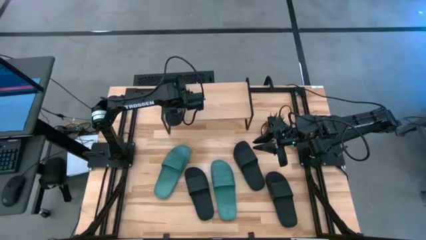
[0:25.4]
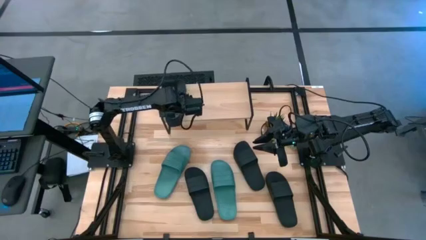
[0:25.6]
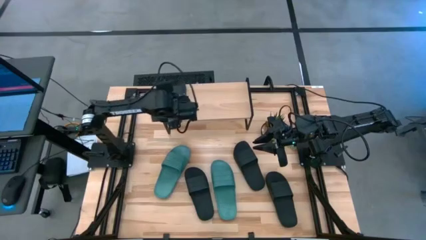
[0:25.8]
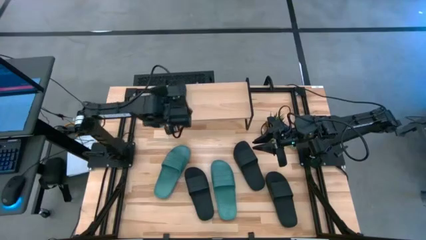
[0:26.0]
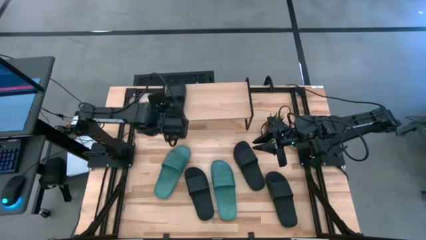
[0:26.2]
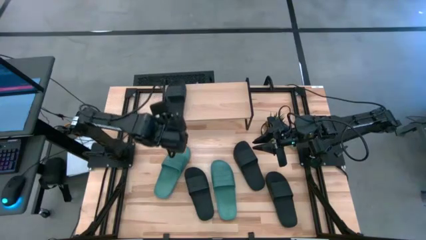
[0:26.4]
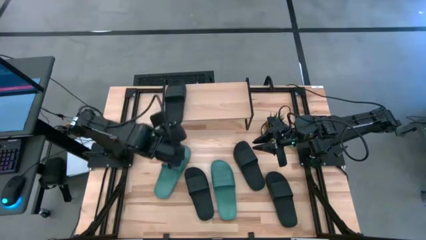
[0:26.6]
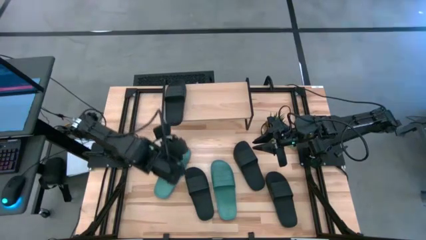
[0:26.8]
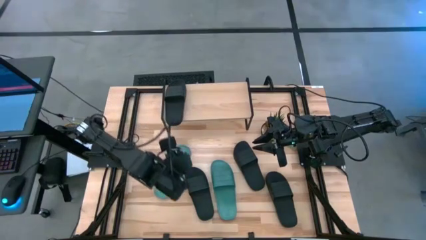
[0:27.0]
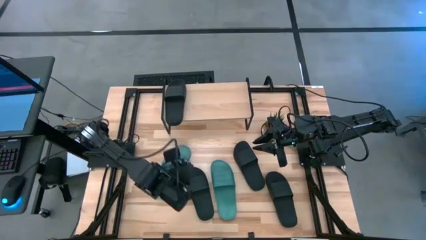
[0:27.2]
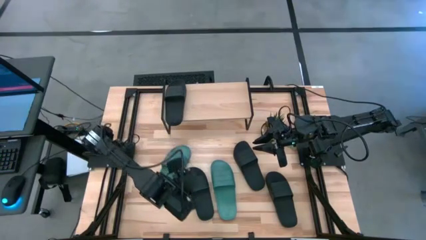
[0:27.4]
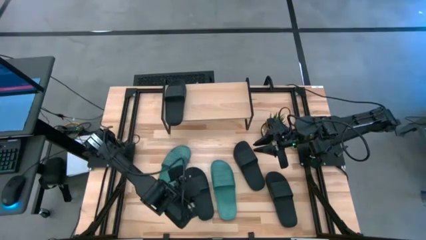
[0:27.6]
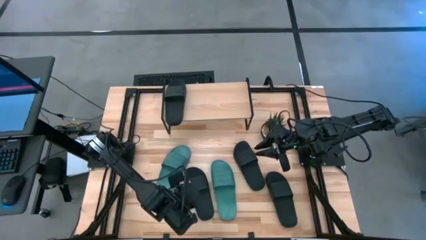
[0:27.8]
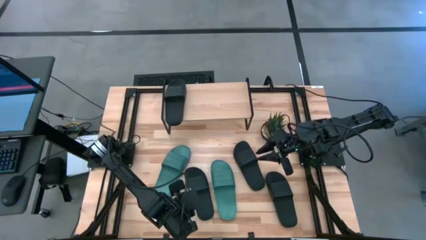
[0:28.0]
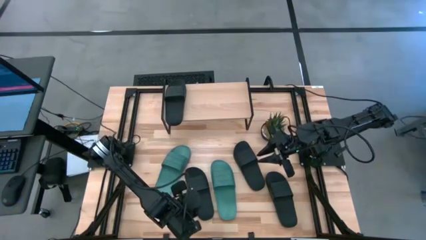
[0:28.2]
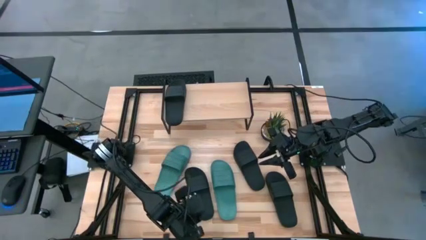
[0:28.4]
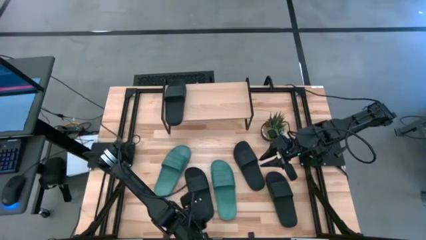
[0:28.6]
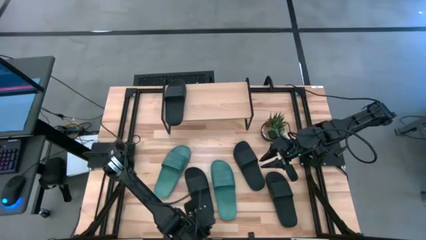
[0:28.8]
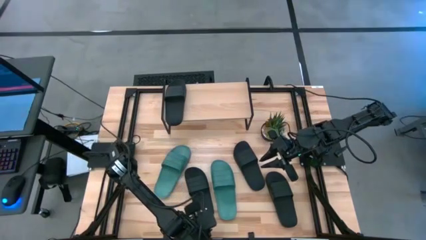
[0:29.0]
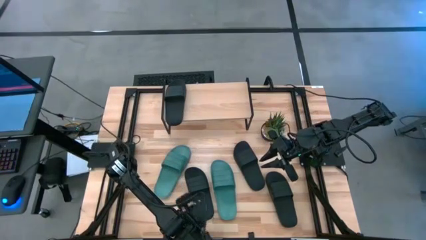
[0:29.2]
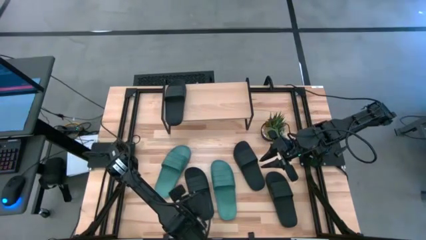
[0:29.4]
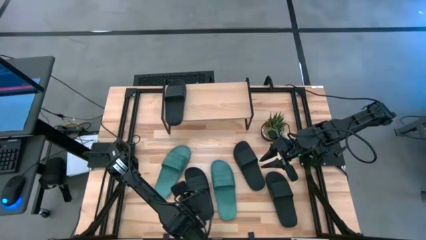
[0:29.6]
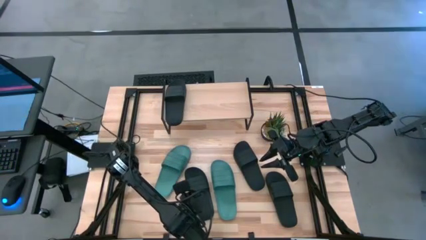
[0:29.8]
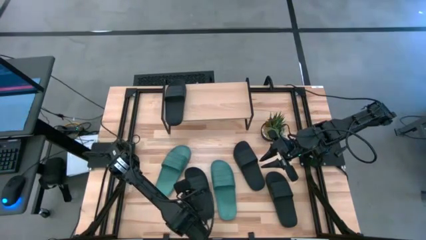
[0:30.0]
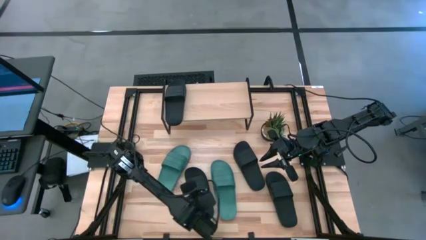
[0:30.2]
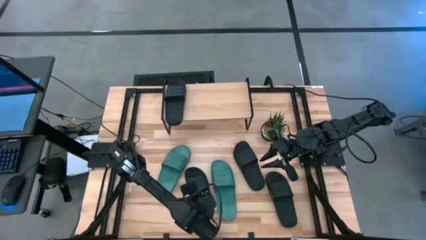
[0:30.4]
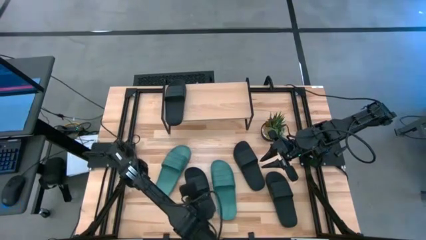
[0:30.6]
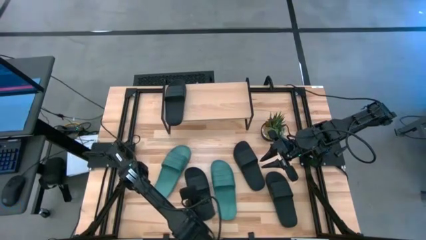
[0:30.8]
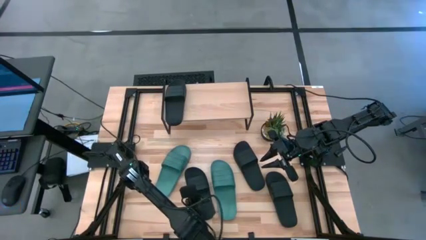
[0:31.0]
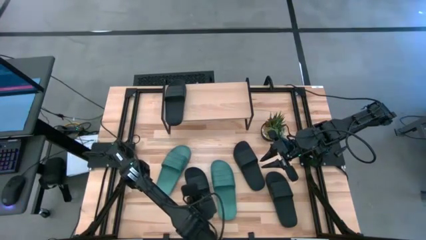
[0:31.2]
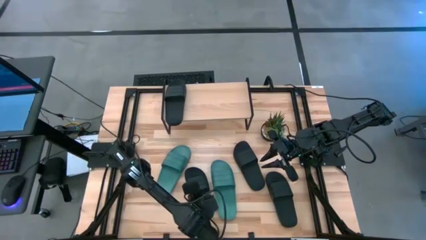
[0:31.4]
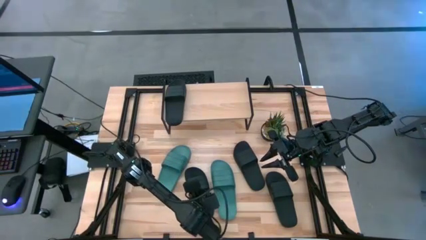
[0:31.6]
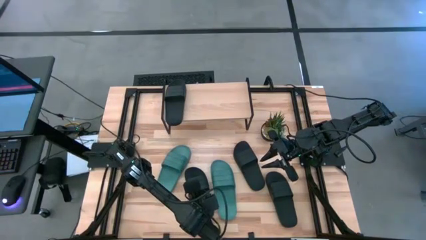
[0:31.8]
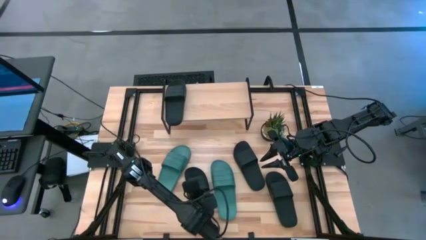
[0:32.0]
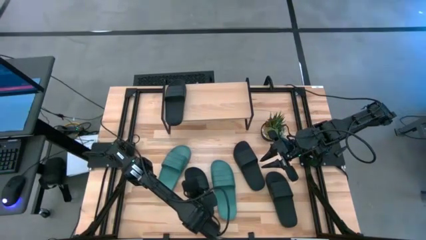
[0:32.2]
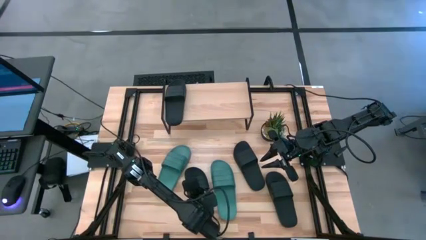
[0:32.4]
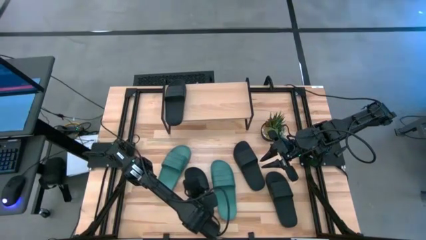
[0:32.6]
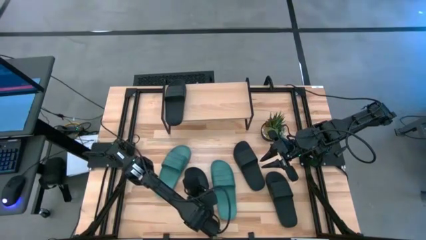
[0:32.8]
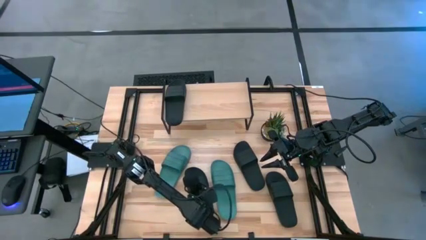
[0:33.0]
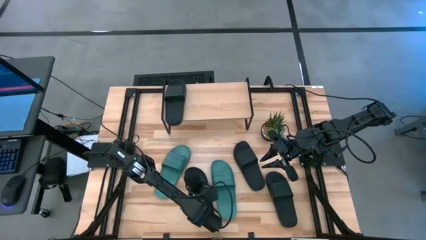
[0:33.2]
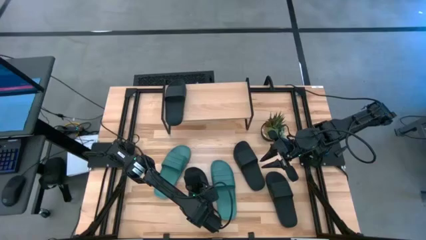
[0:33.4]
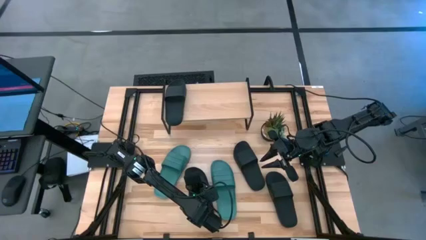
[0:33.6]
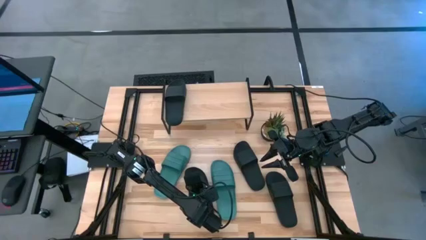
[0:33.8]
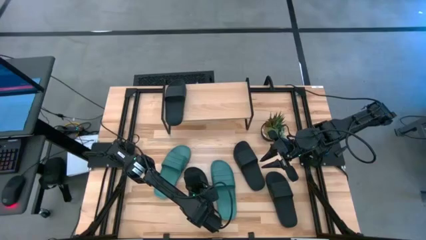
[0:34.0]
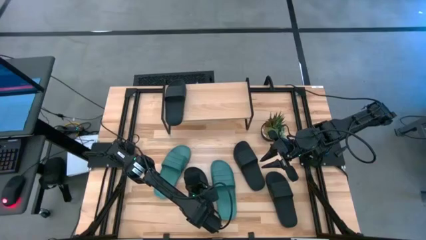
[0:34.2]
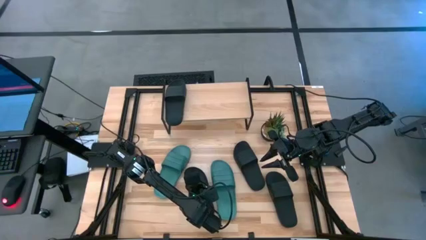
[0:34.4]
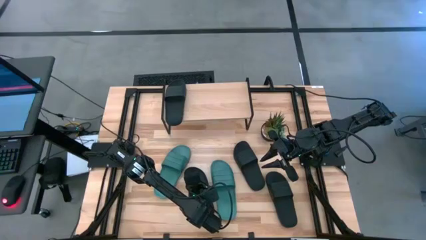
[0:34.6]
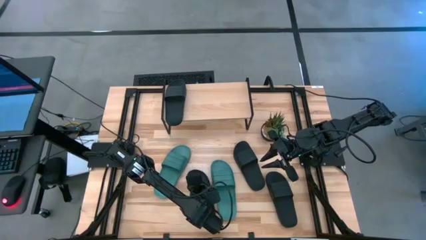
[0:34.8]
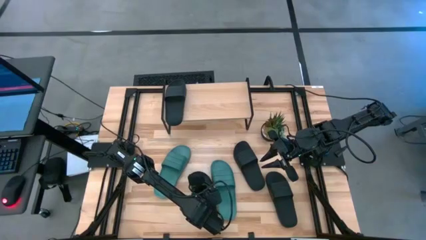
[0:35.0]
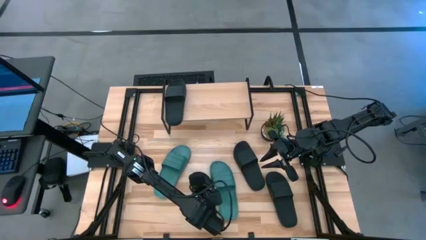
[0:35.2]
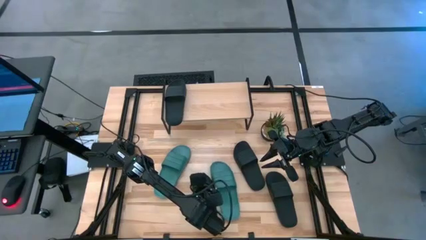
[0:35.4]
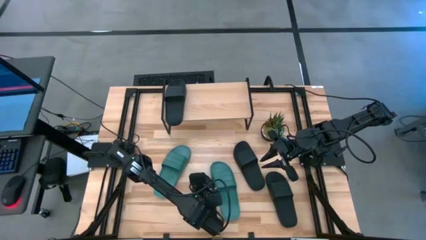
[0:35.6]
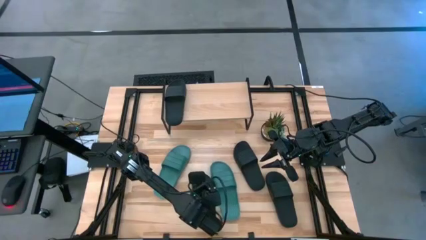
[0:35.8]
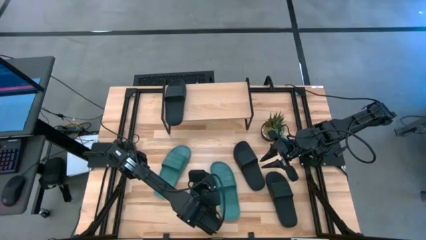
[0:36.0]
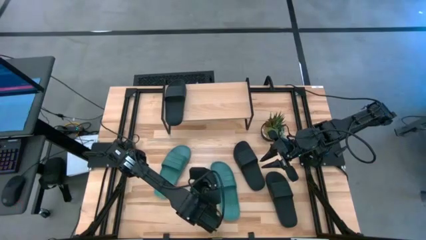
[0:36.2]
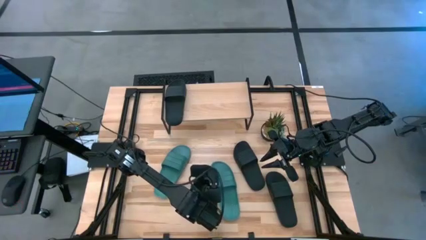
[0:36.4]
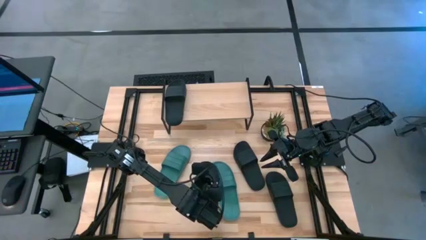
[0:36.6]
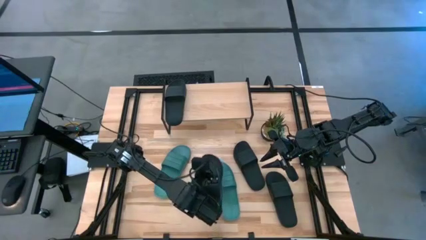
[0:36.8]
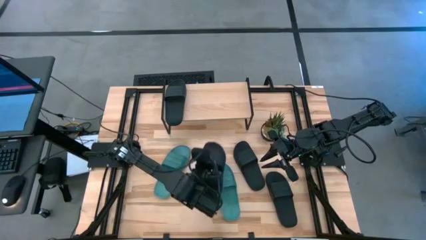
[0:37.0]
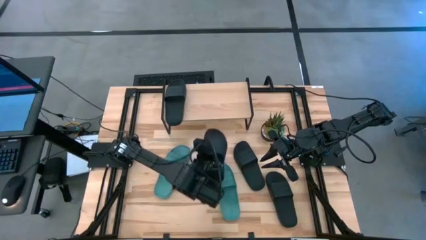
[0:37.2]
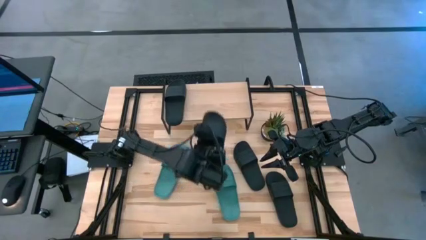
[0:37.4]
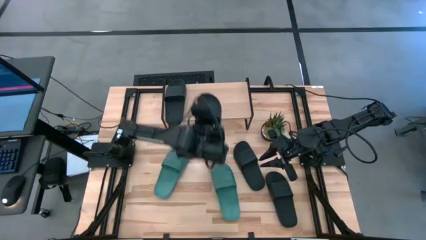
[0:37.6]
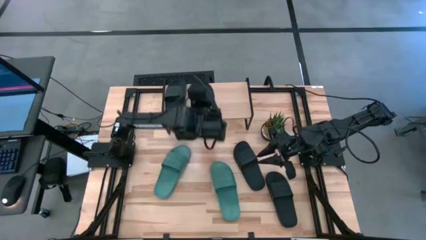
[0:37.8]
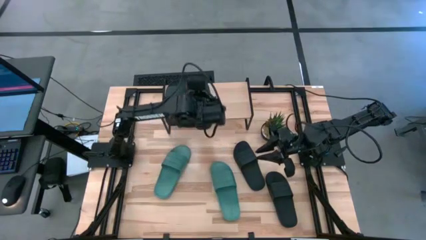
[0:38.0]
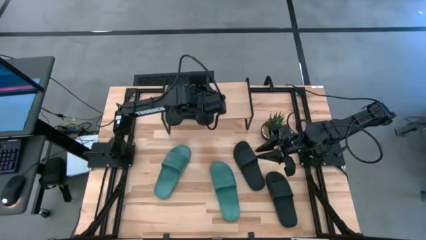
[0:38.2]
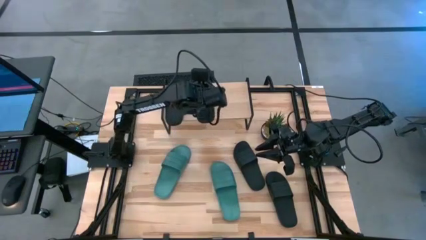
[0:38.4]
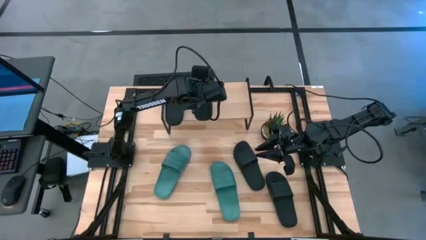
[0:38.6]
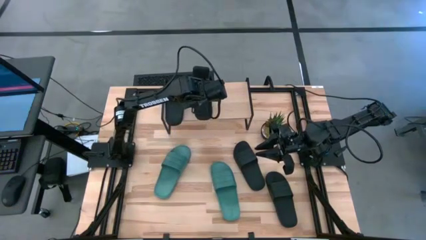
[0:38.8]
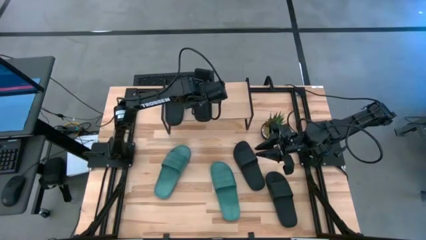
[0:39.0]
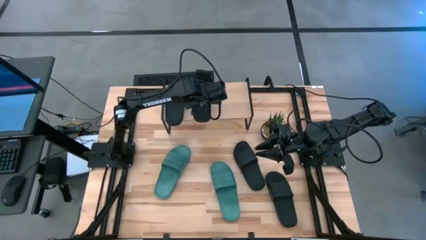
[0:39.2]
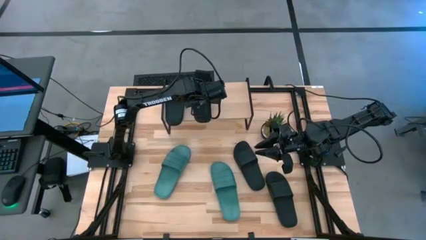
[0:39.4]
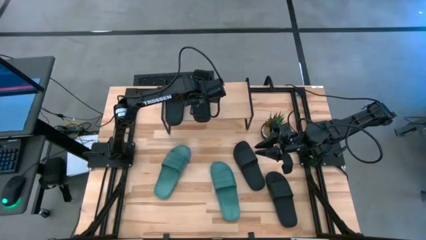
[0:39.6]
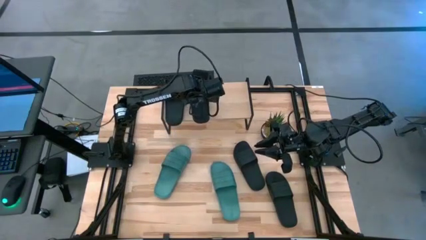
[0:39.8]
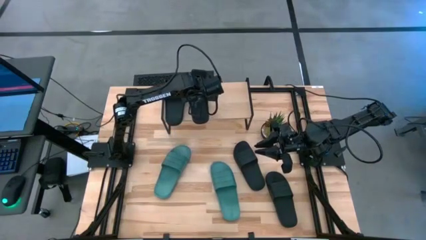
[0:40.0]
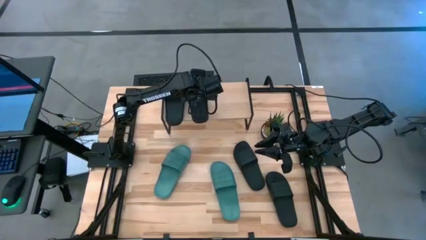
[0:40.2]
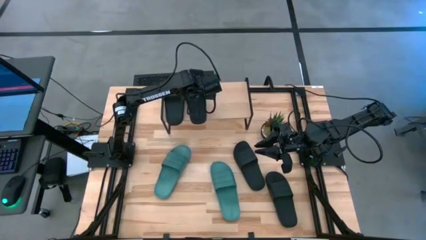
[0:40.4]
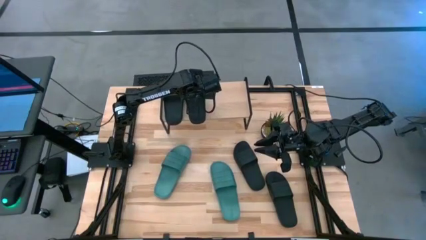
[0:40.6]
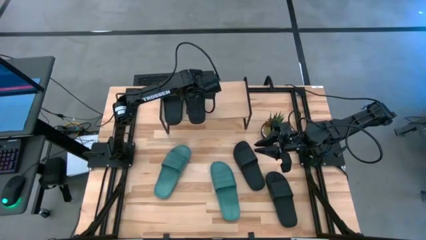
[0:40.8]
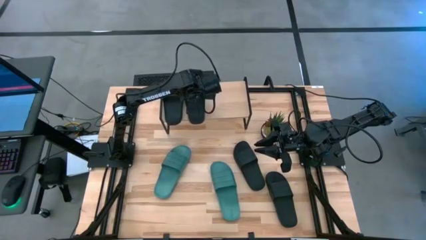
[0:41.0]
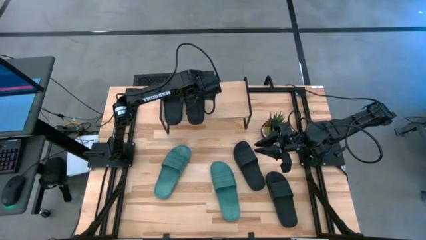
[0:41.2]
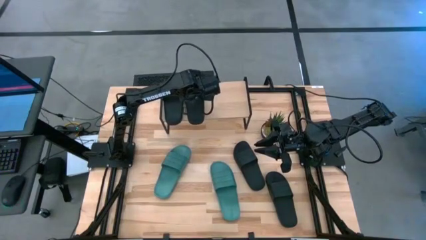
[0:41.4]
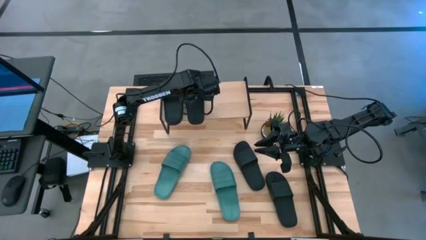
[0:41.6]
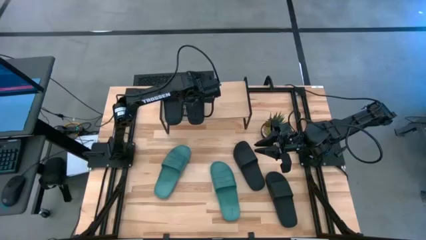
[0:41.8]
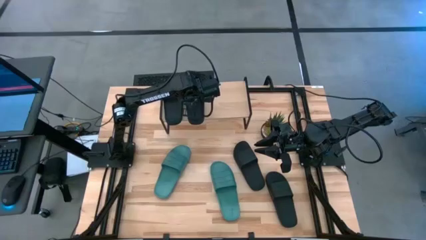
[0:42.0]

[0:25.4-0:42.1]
Task: Pick and place slides into the shelf
Put the black slide on the shelf
